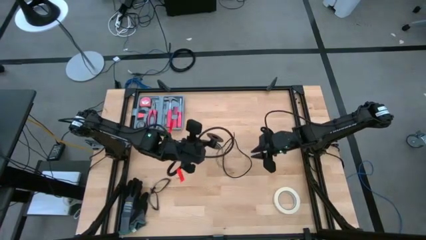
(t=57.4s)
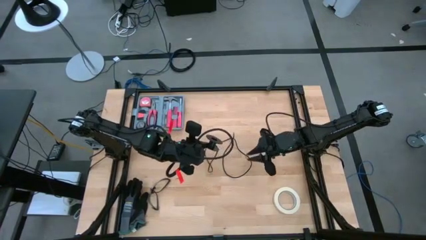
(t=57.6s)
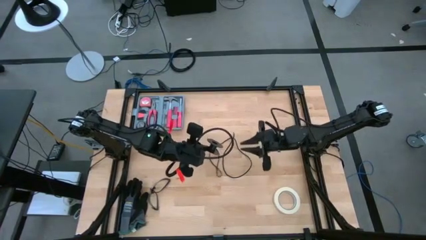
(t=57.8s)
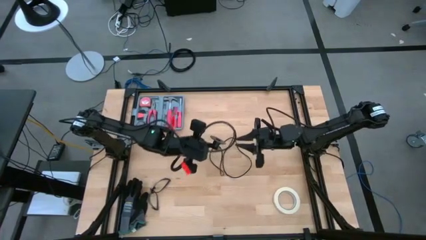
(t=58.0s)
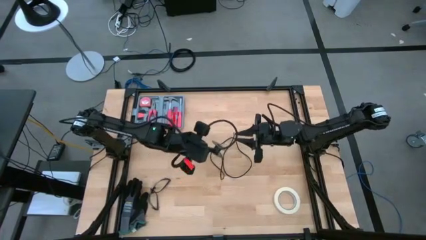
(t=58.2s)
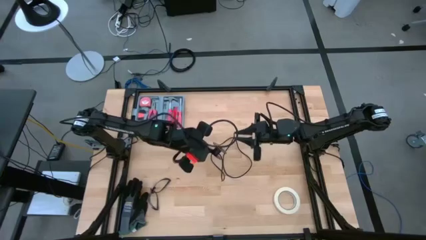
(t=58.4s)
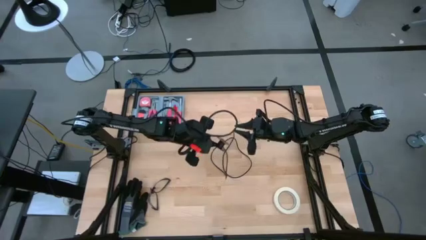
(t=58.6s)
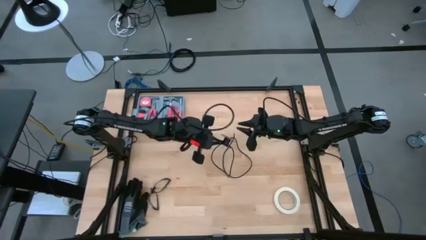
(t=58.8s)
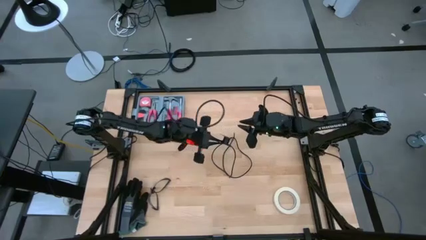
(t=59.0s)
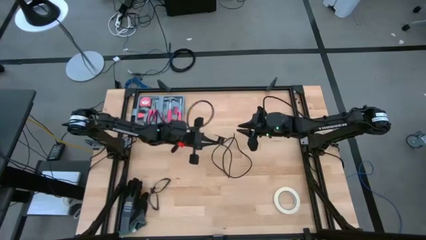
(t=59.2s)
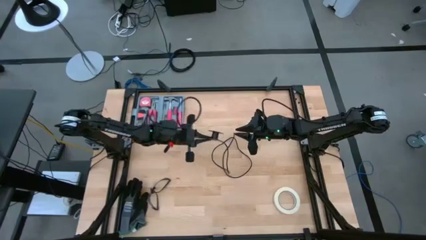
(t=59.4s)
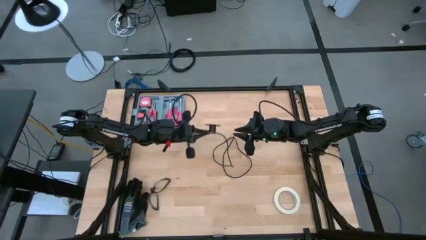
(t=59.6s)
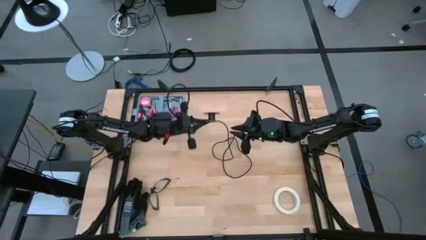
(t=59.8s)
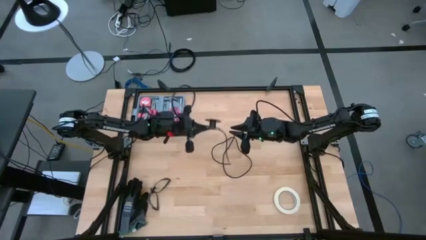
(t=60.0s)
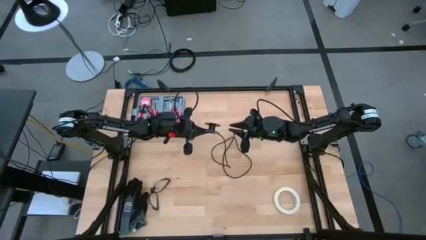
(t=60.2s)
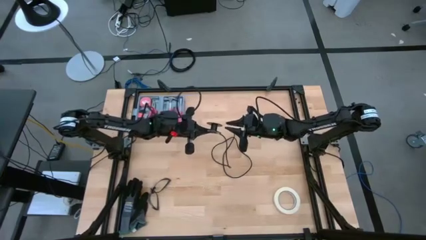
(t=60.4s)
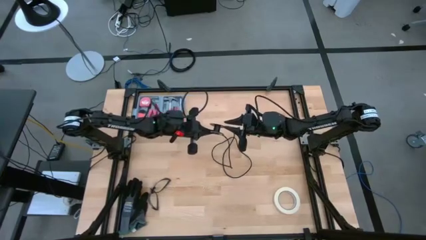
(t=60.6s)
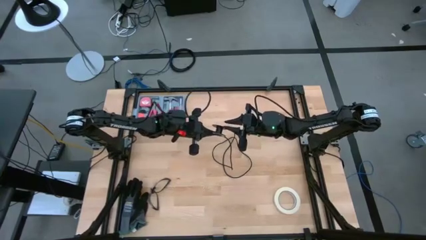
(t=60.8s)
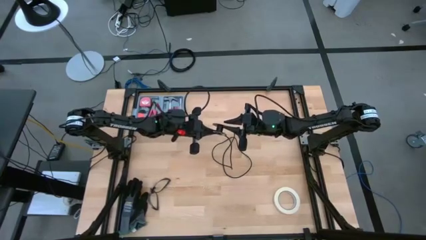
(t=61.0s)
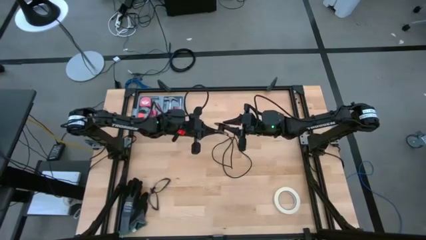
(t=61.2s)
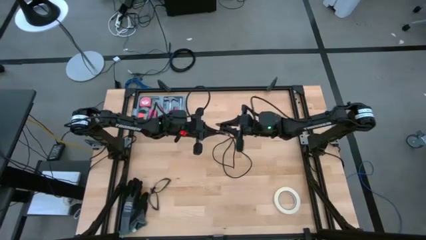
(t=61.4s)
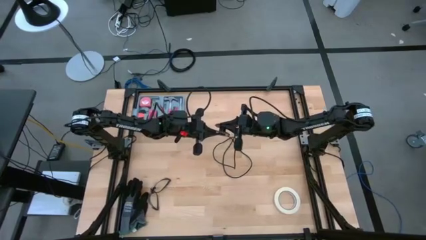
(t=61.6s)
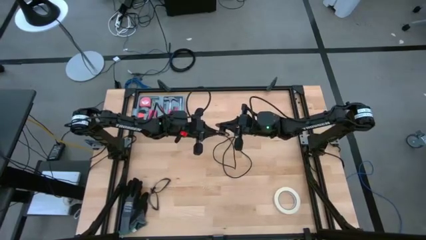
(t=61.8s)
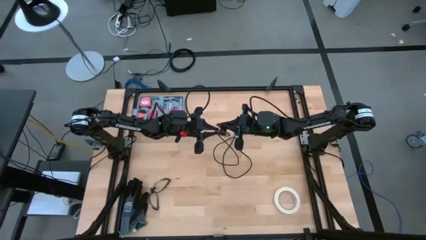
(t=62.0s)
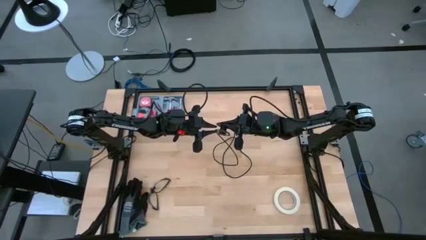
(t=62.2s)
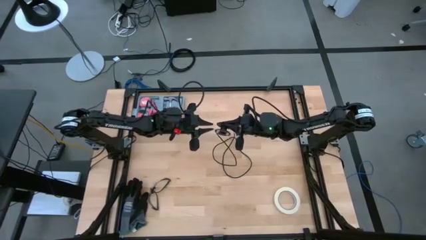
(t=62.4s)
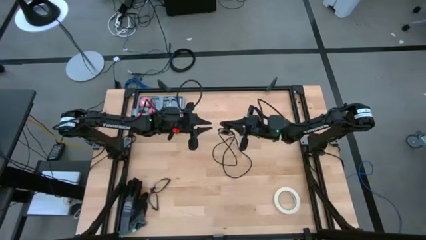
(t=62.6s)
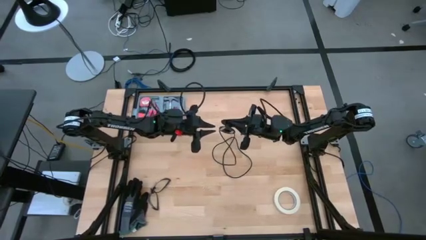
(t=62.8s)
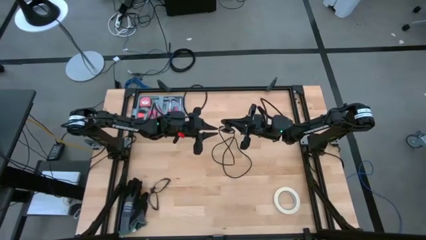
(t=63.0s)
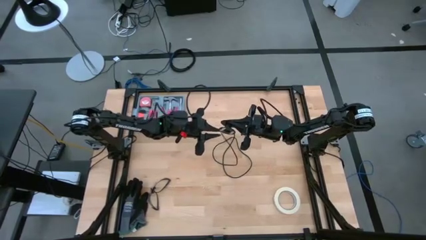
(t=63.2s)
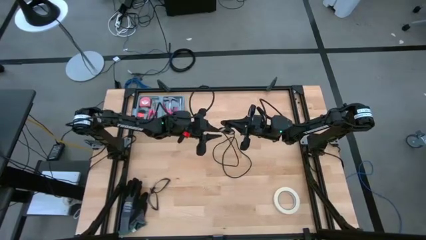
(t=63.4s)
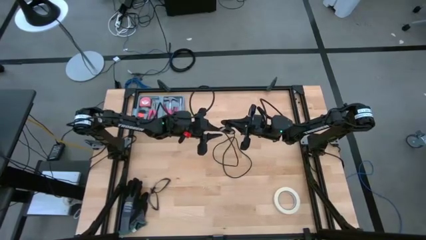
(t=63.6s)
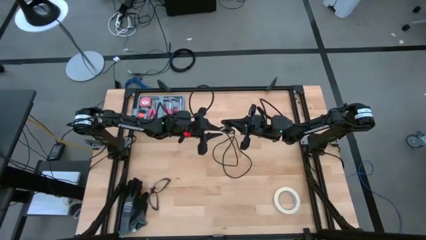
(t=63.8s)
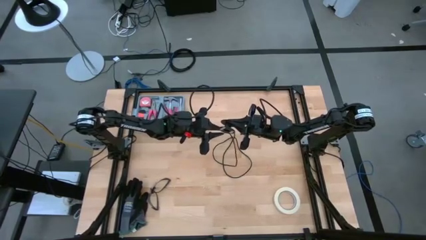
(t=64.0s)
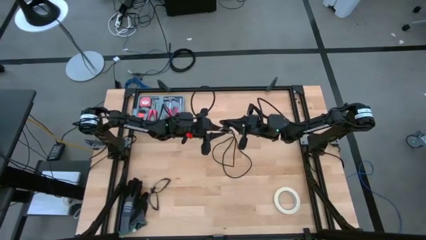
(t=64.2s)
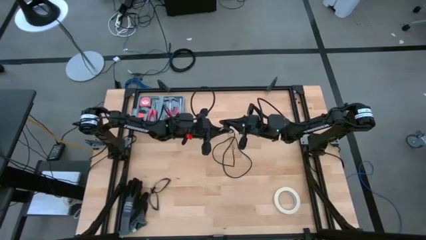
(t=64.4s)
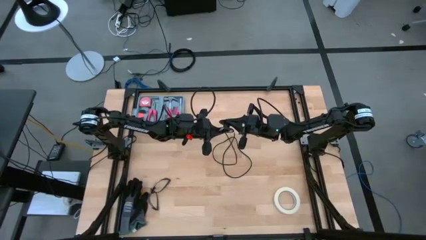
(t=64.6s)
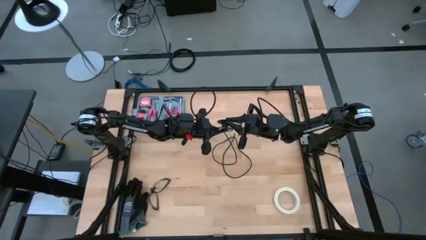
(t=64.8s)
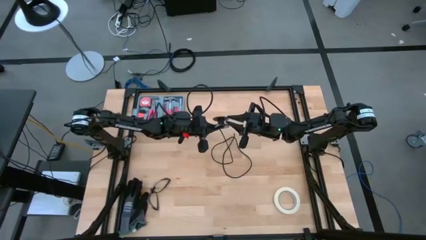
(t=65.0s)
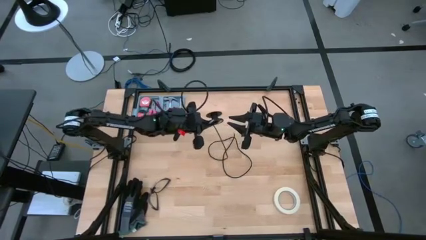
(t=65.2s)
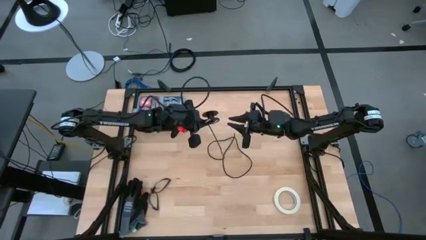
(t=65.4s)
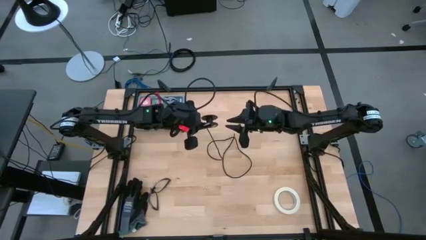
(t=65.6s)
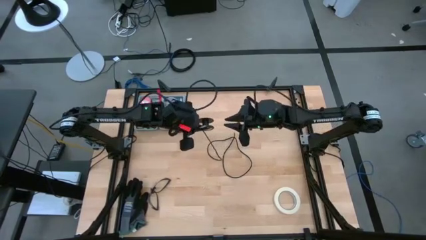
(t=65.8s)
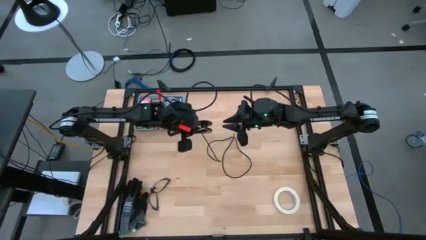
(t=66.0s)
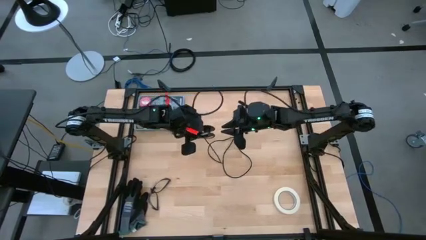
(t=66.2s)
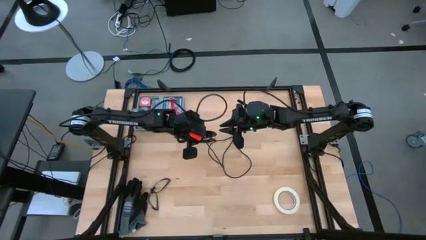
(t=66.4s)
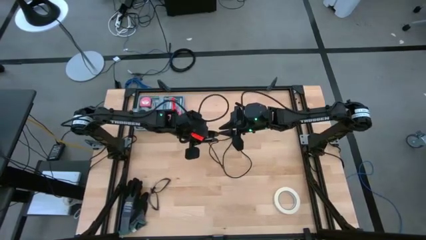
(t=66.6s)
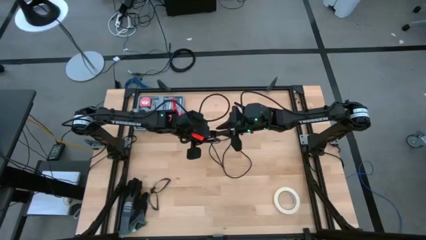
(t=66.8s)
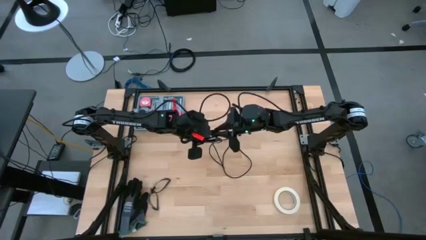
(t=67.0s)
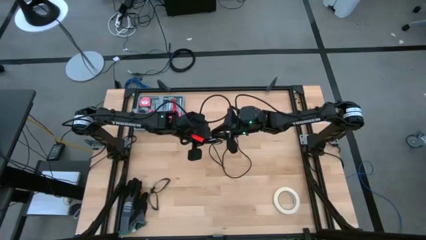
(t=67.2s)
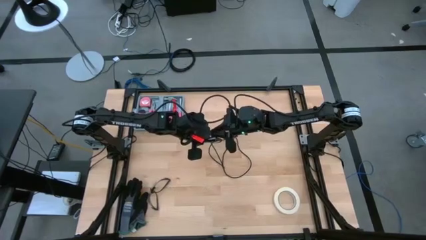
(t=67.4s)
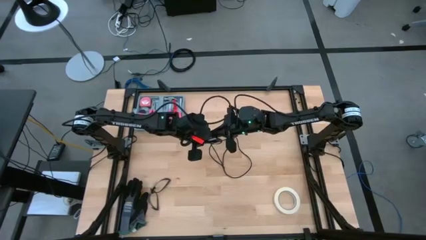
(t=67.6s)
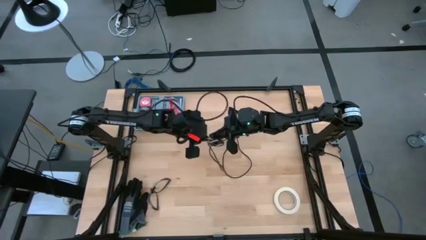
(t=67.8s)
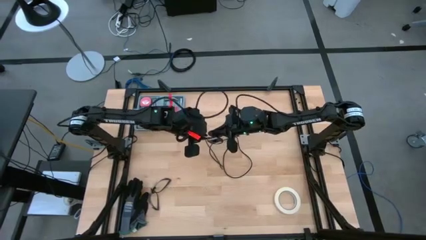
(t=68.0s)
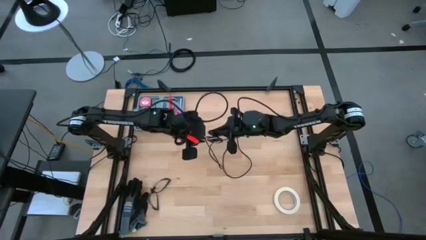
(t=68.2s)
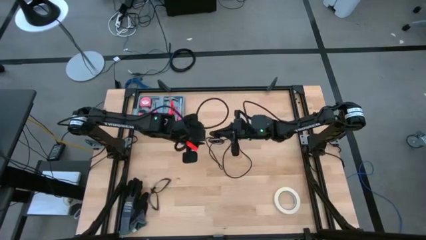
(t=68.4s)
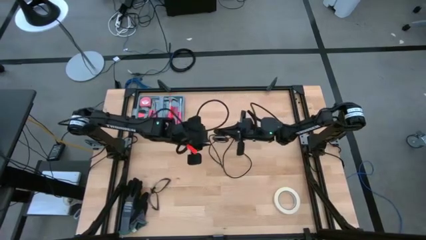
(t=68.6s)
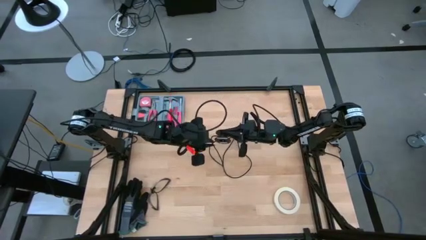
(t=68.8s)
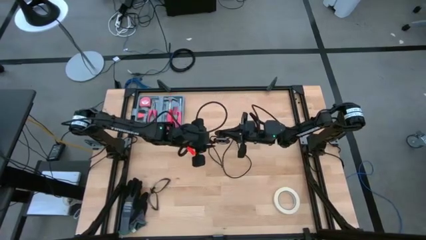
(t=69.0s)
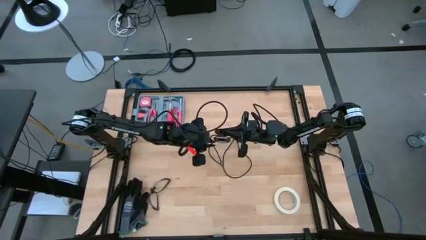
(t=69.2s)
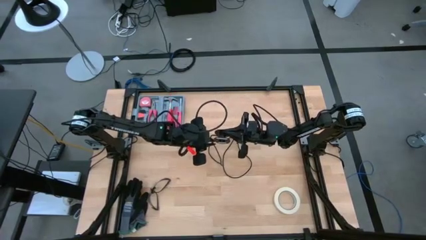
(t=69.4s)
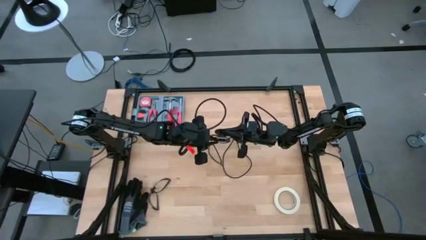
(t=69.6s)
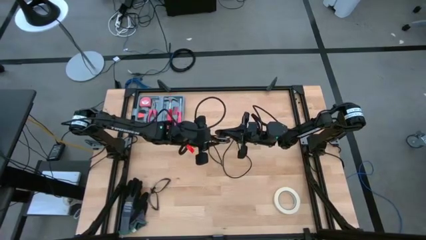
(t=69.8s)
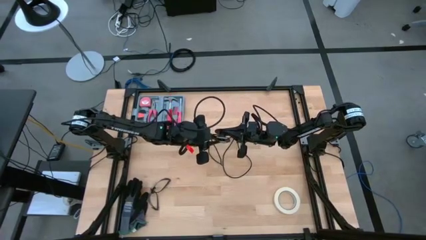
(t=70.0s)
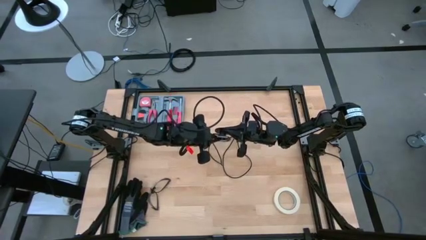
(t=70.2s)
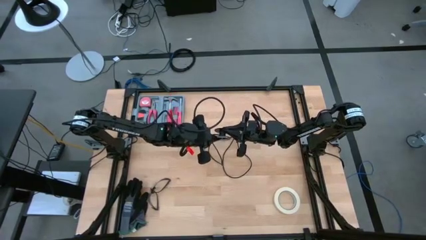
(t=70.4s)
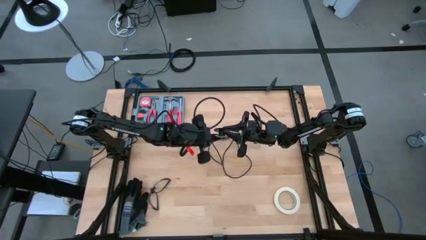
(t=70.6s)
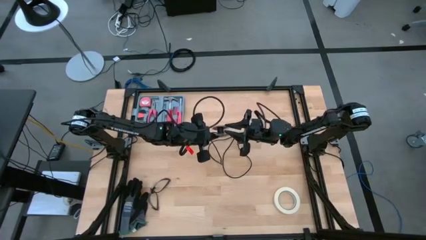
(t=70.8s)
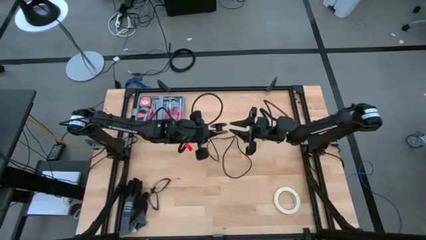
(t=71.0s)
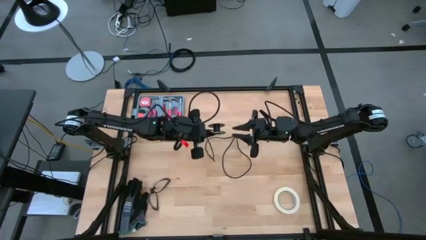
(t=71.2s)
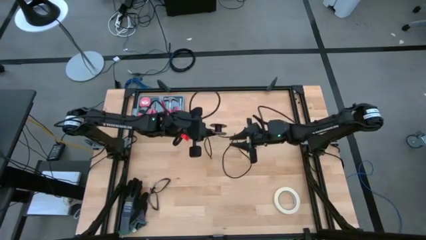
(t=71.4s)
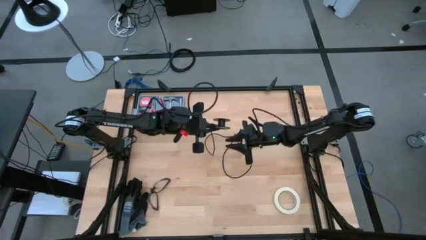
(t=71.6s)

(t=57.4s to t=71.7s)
Task: Coil cords
Coil the black wire onto the spool

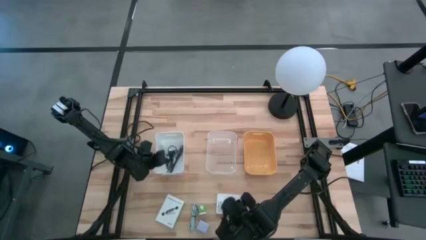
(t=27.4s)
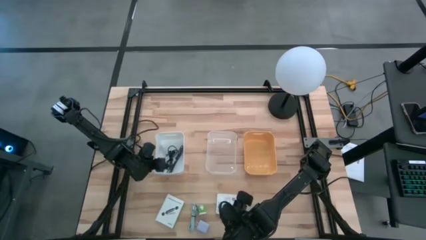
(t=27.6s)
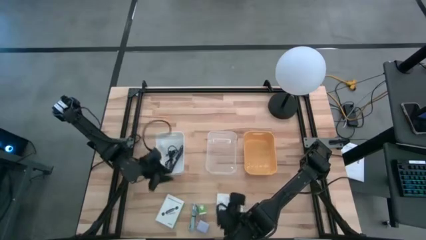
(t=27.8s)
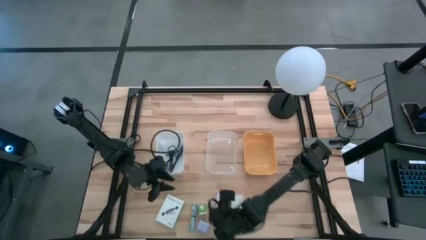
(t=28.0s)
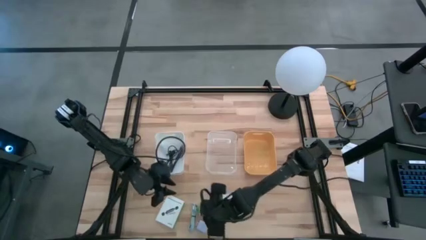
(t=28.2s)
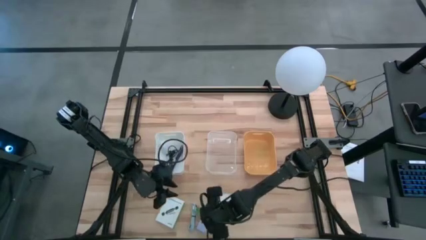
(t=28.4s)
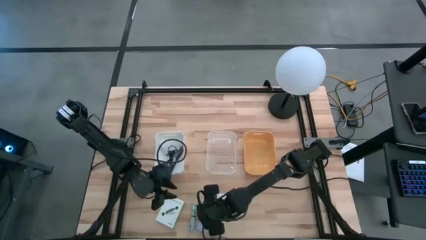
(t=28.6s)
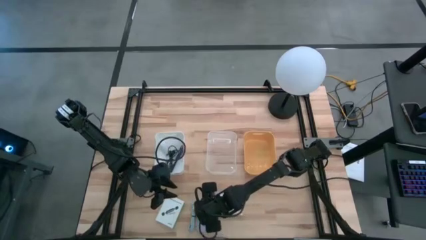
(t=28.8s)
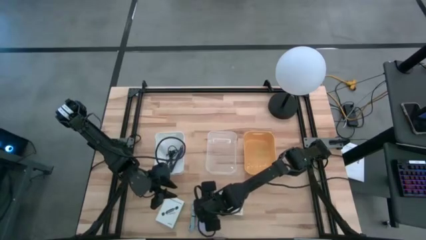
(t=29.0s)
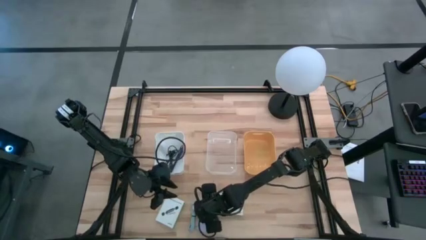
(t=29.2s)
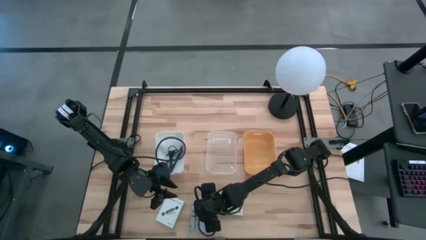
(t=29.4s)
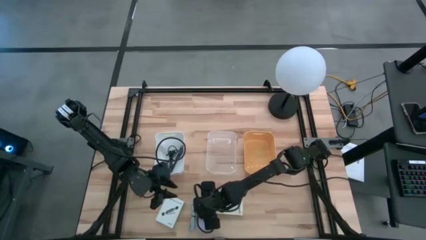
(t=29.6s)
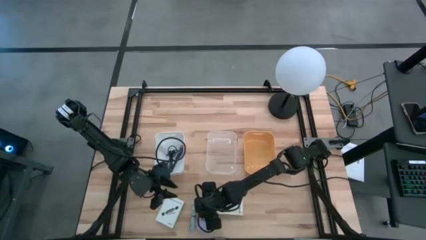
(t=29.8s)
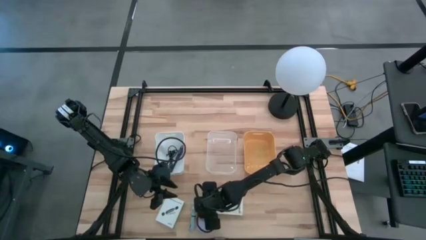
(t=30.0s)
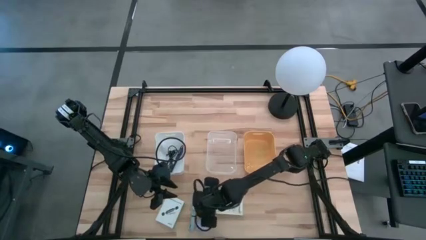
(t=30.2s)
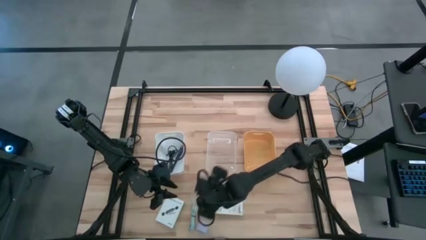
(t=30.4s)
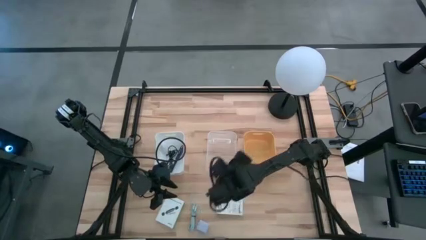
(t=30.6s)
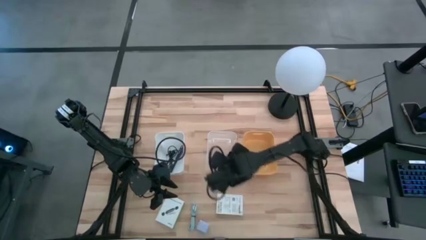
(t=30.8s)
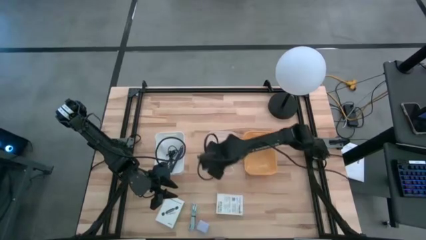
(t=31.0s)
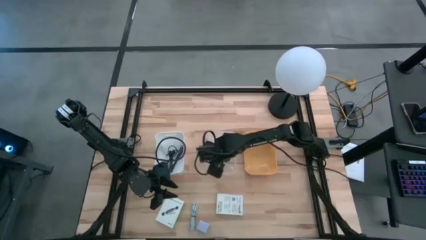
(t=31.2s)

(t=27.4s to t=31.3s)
Task: Pick and place items into bin
Put the green charger adapter into the transparent bin
